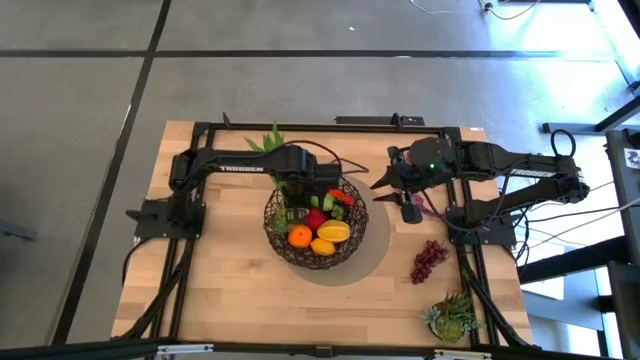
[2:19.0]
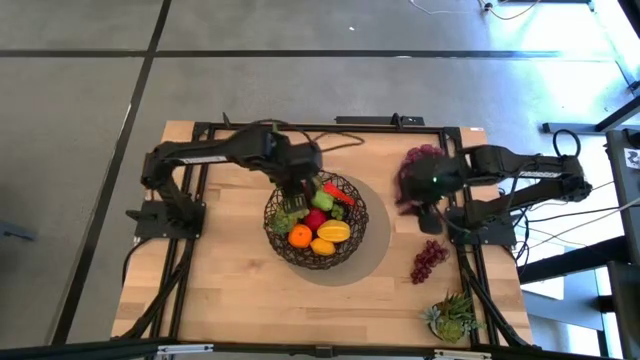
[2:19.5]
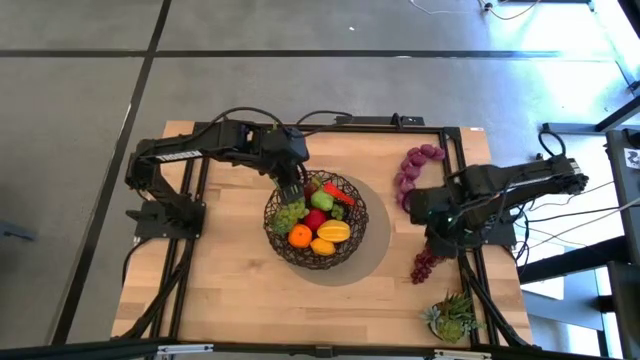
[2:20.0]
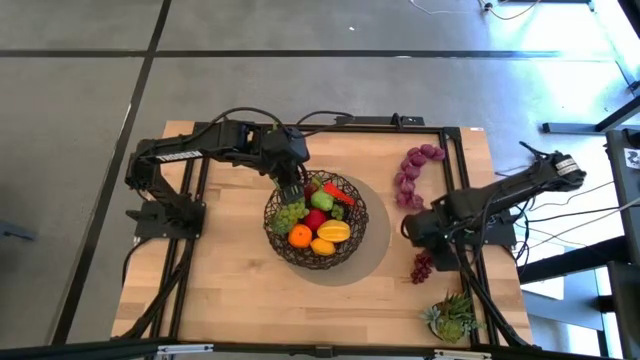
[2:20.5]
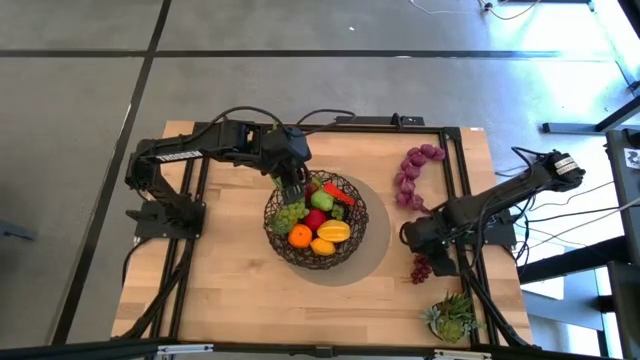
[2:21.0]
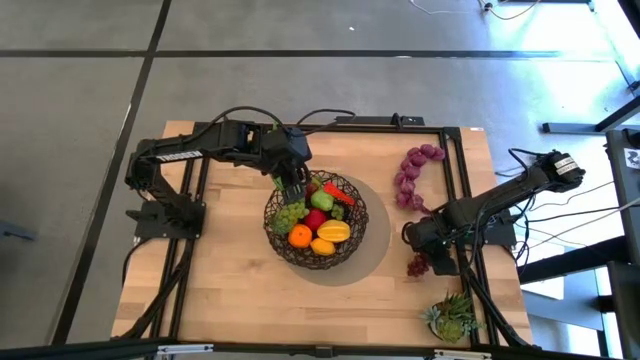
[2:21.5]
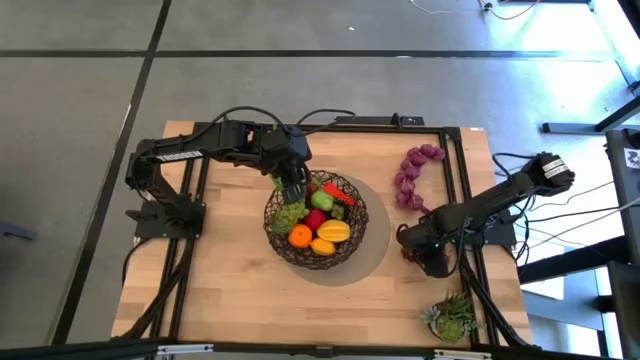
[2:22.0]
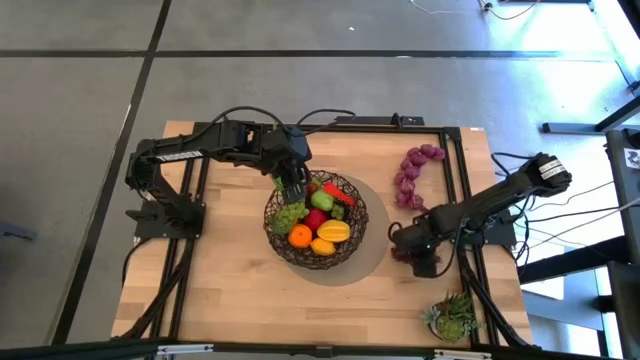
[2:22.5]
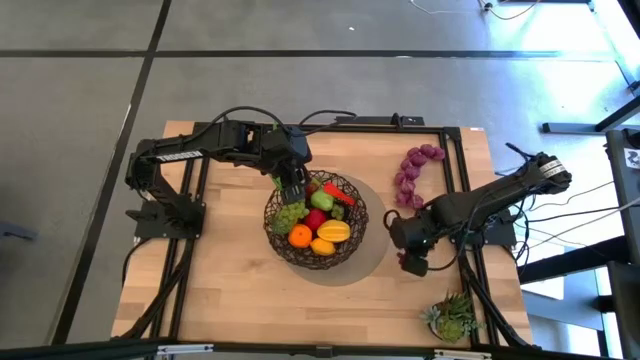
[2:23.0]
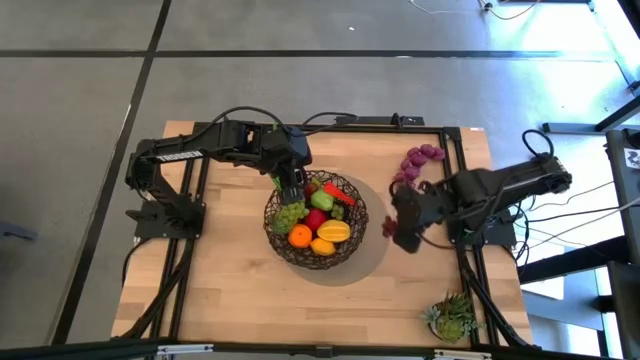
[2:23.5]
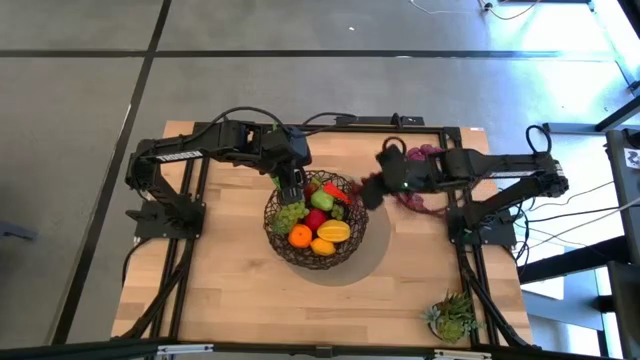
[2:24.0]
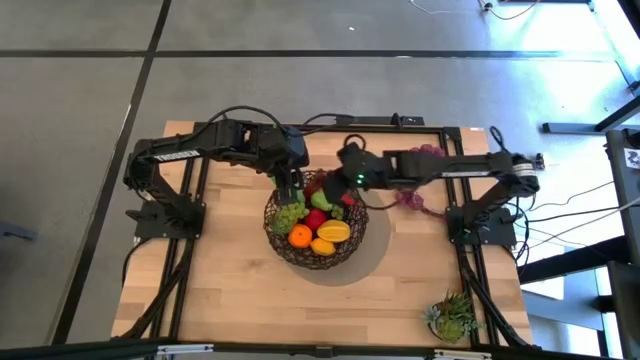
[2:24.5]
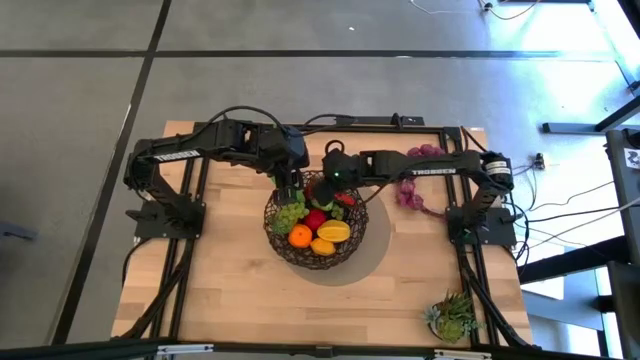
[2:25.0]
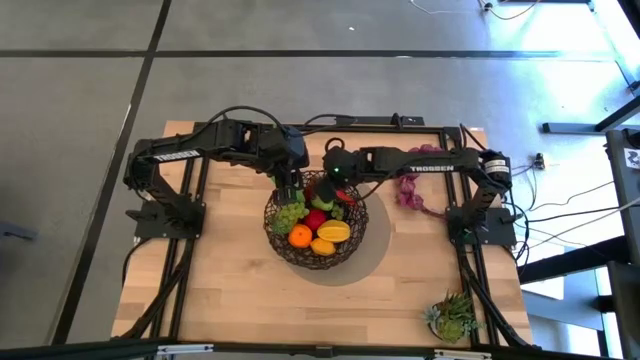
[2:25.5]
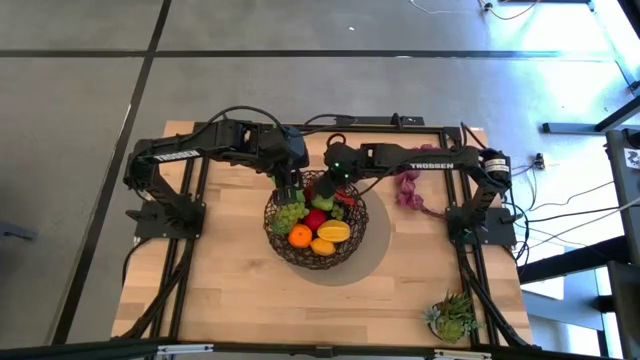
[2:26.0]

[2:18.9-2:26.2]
Task: Build produce basket
Put the dark red grapes into the wire basket

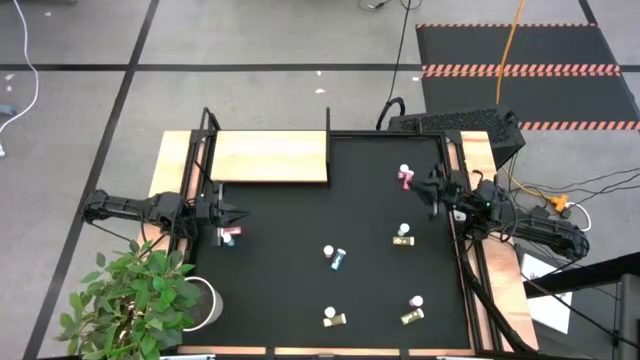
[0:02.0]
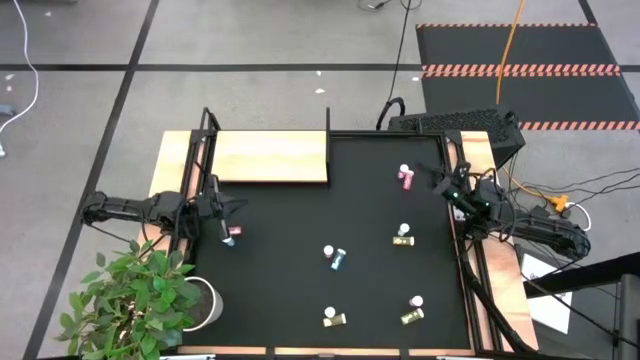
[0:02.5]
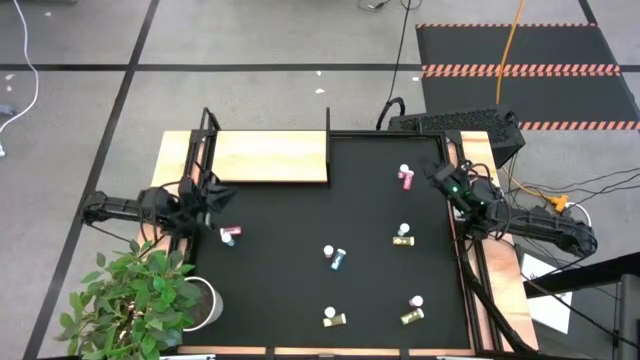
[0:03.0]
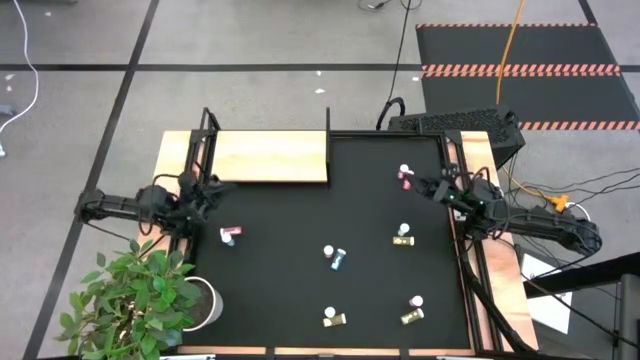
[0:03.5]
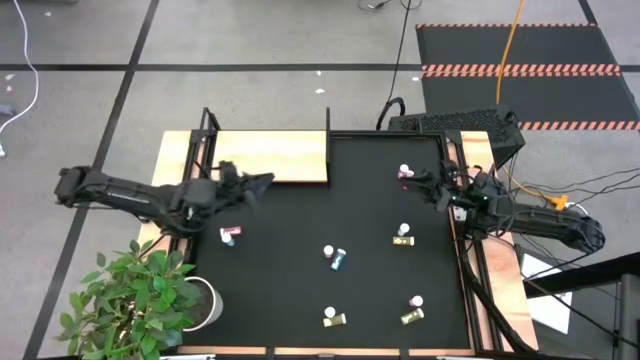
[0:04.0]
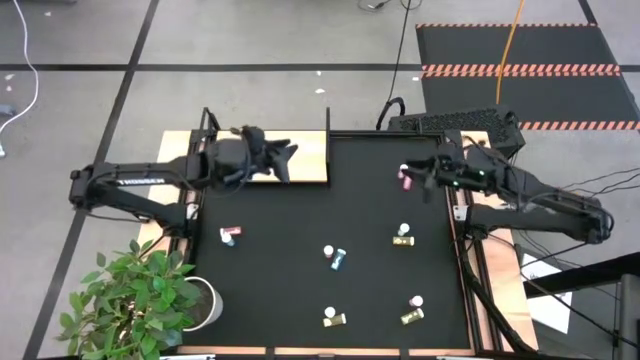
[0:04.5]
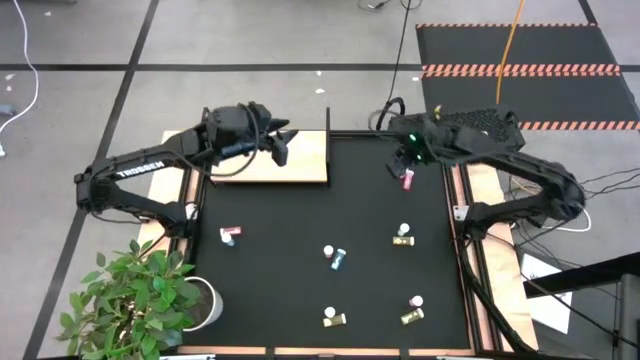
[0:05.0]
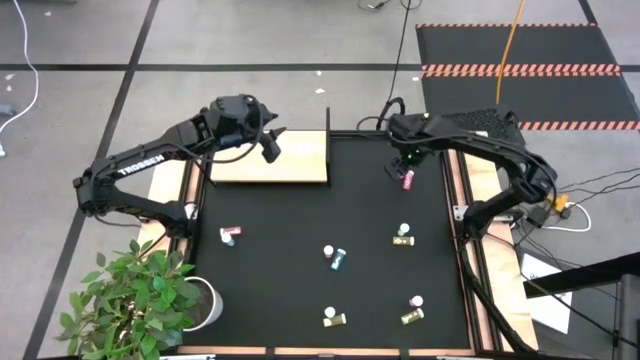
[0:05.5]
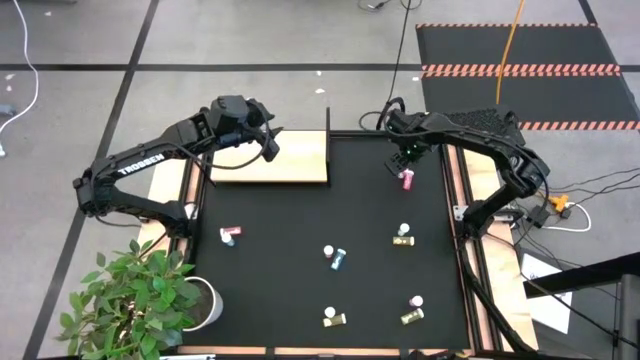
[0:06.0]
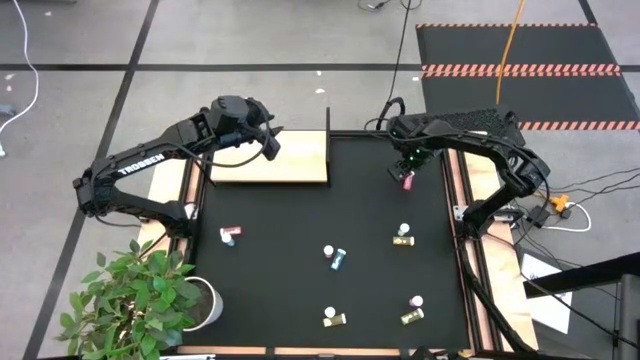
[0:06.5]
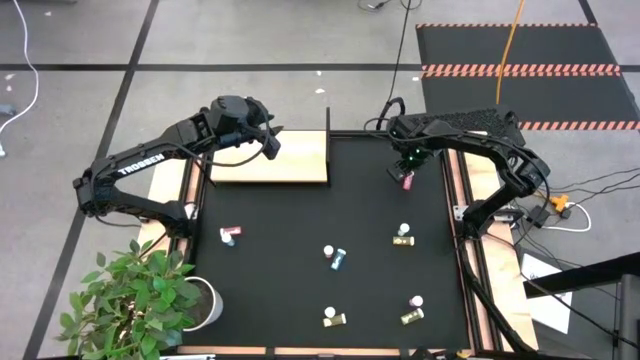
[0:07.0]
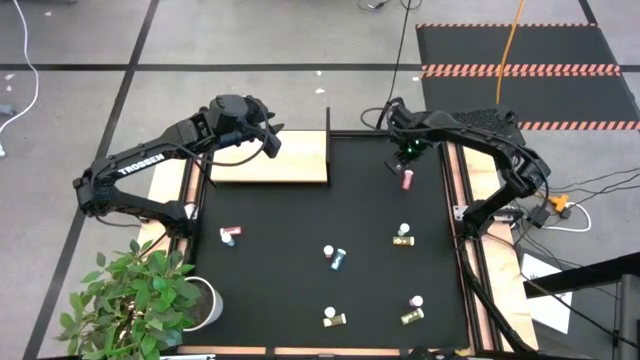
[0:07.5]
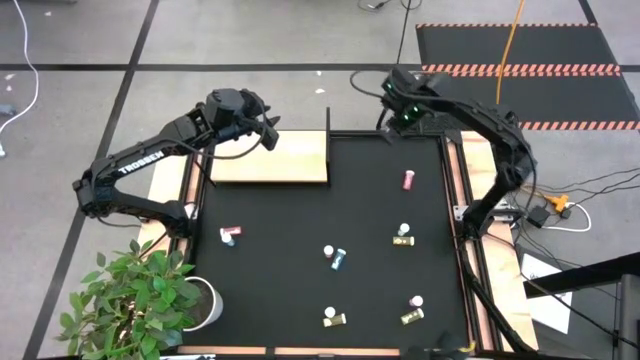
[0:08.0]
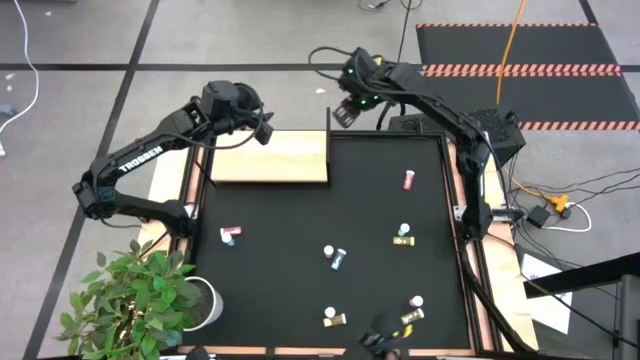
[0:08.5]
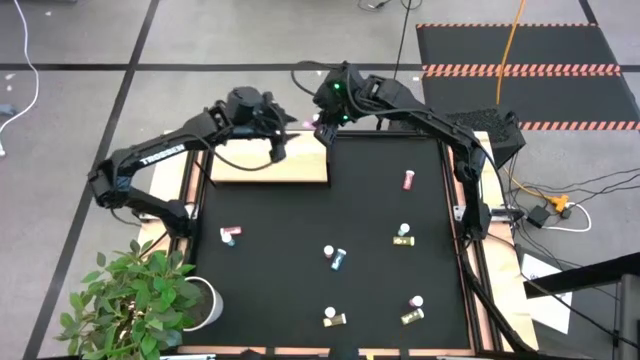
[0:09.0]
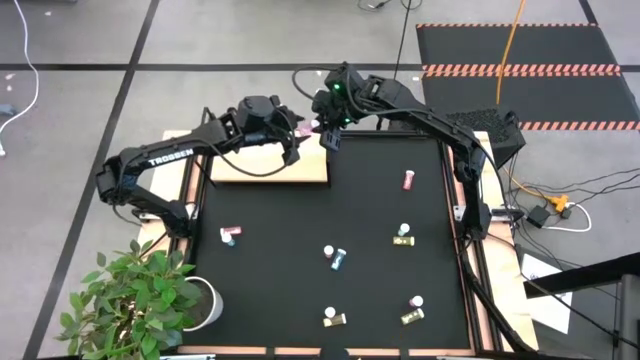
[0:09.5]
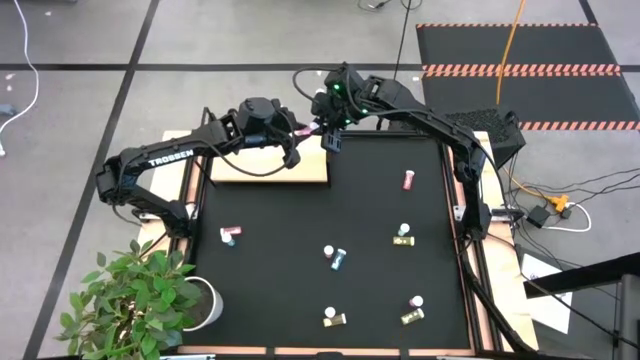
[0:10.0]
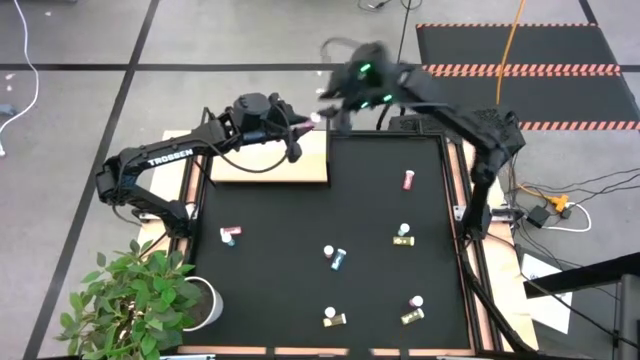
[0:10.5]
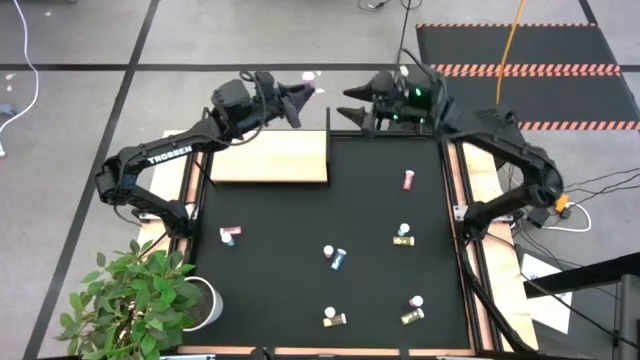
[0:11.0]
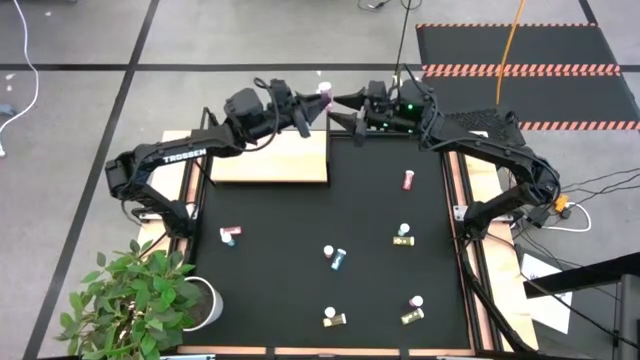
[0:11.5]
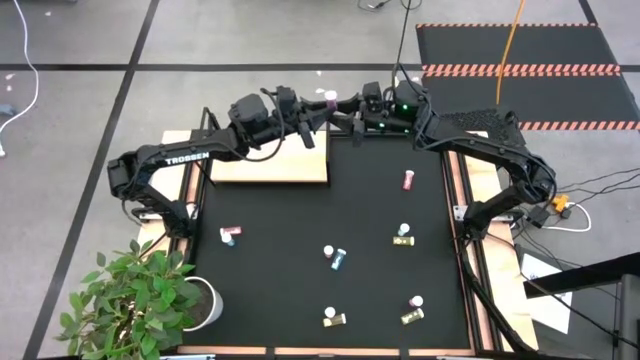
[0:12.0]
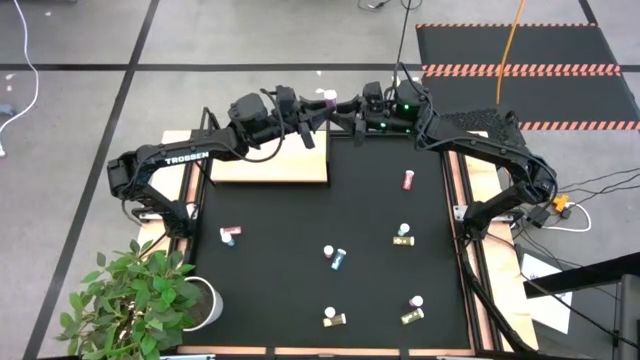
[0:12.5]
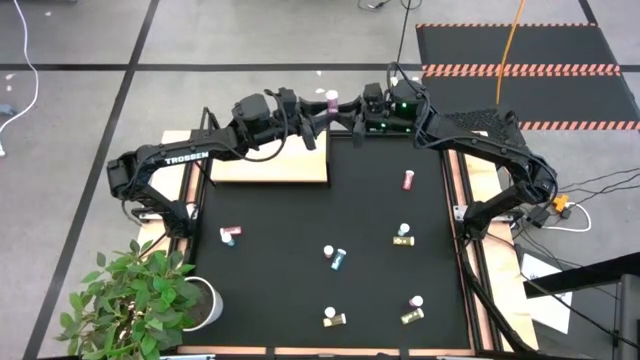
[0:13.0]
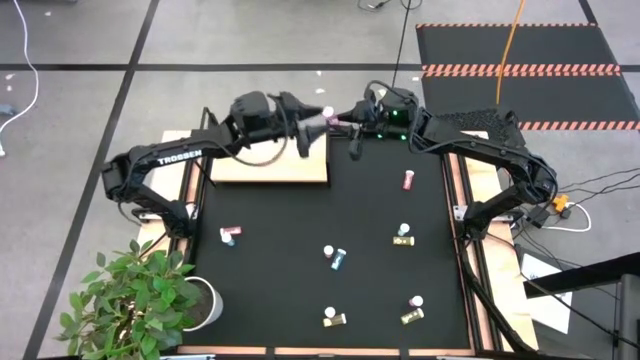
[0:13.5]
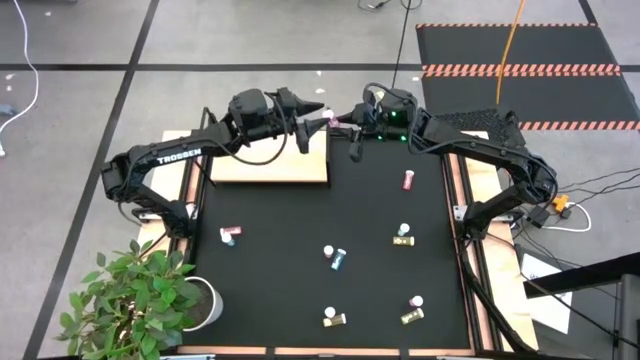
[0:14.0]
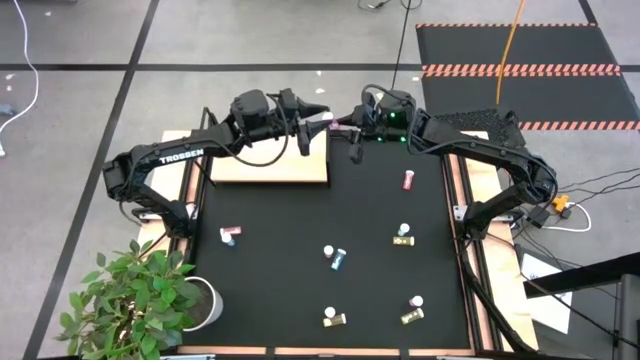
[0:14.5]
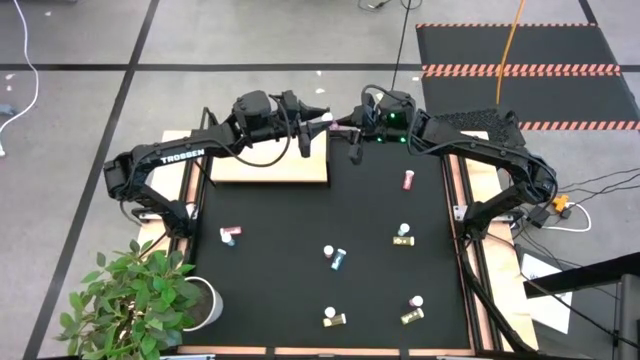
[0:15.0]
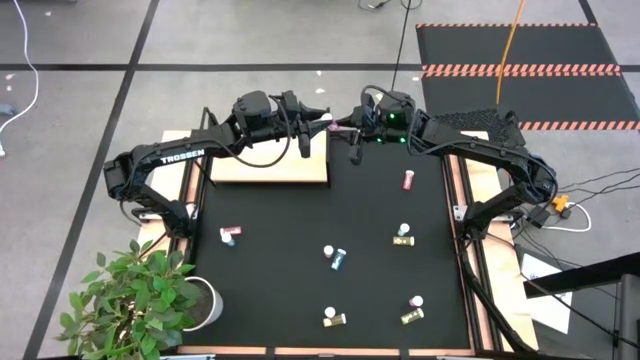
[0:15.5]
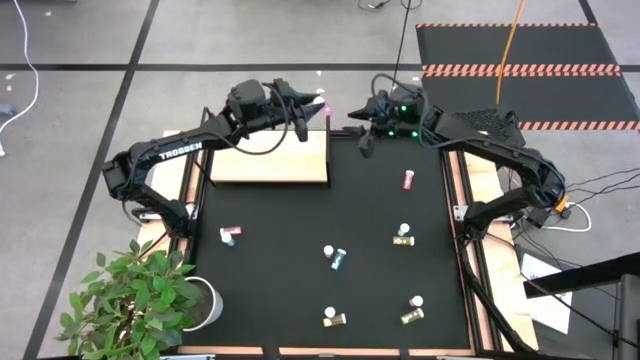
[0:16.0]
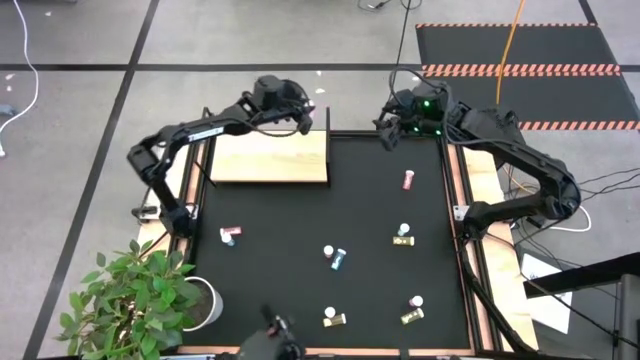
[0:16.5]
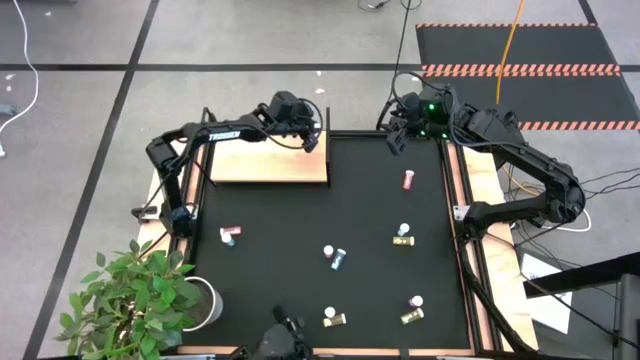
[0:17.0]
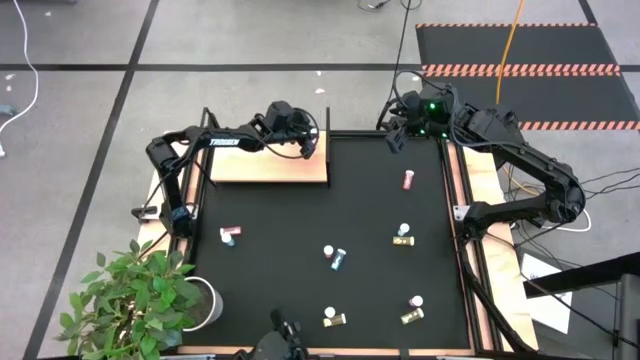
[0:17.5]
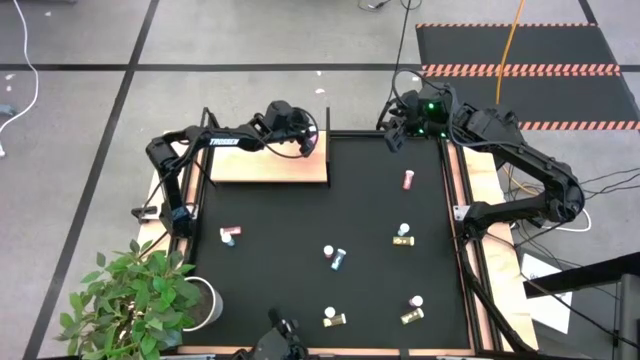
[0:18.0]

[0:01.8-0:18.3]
Task: Pick and place medicine bottles onto shelf by color
Put the purple pill bottle on the shelf
